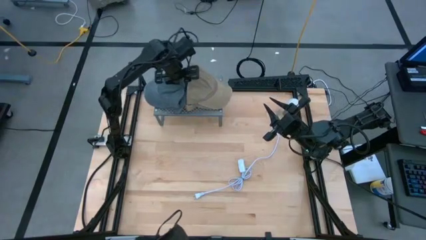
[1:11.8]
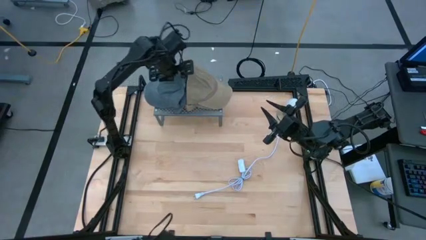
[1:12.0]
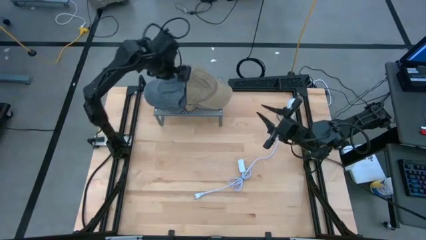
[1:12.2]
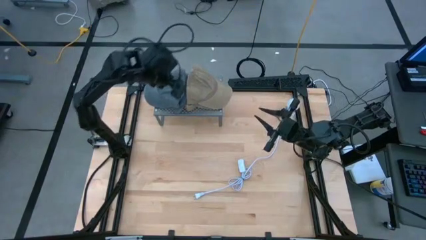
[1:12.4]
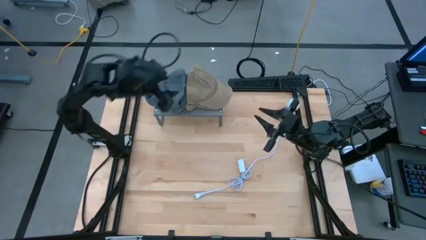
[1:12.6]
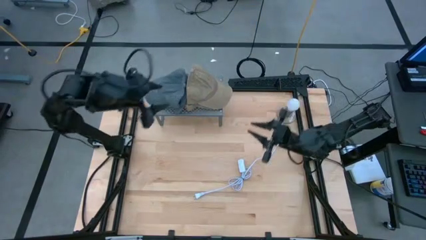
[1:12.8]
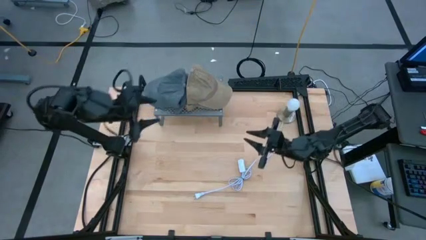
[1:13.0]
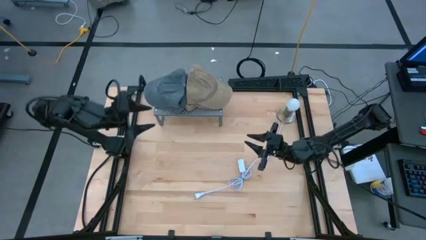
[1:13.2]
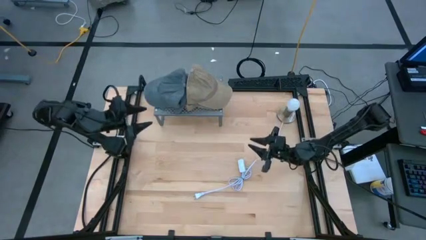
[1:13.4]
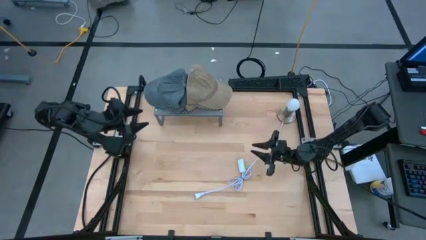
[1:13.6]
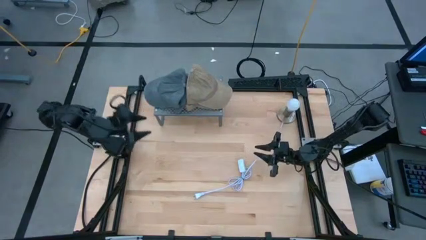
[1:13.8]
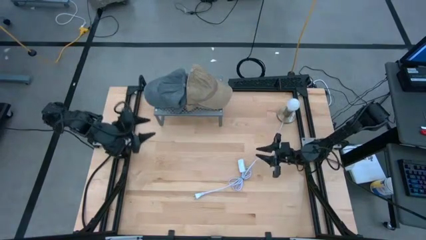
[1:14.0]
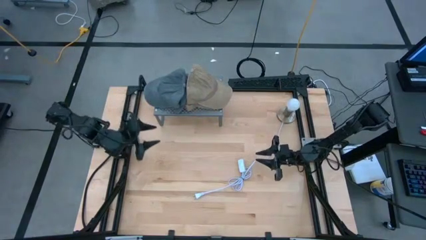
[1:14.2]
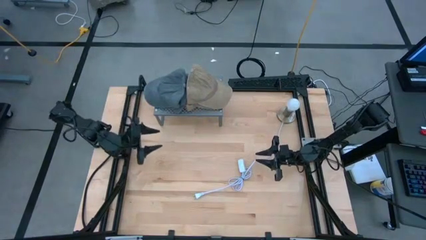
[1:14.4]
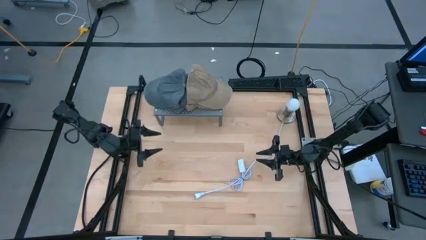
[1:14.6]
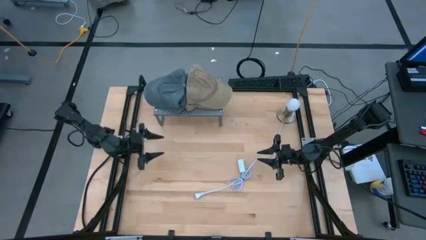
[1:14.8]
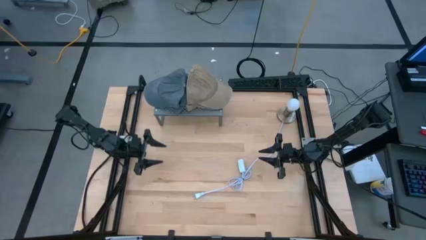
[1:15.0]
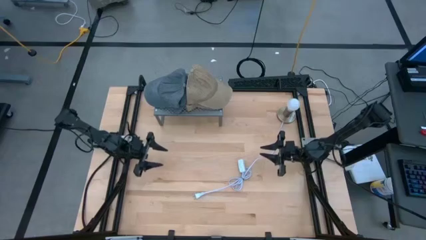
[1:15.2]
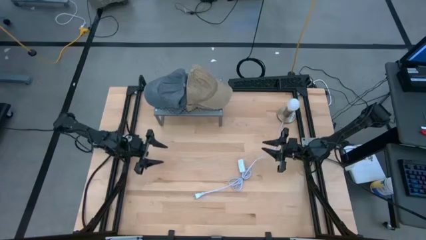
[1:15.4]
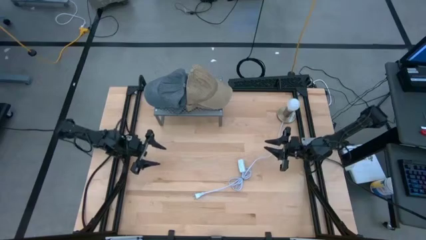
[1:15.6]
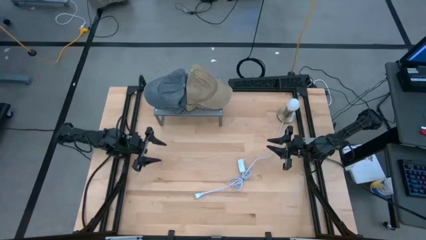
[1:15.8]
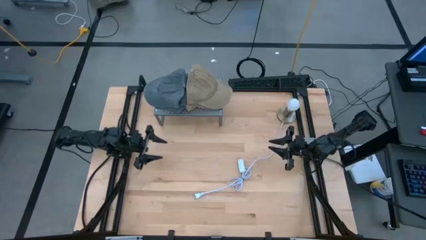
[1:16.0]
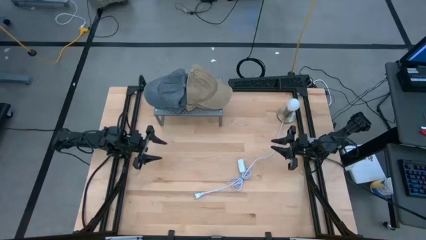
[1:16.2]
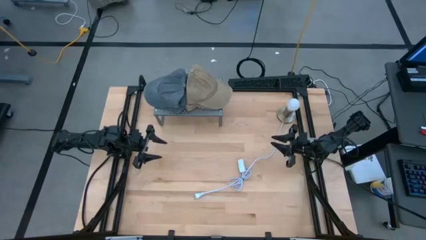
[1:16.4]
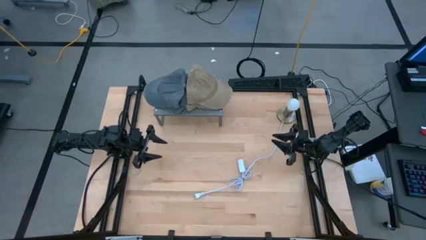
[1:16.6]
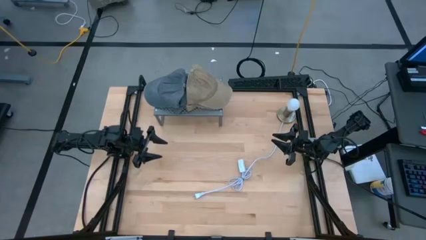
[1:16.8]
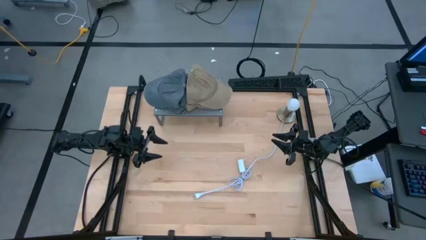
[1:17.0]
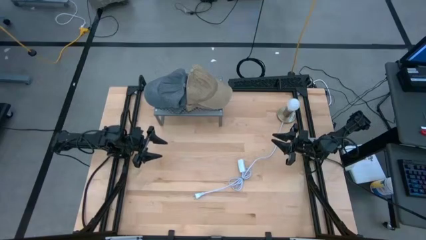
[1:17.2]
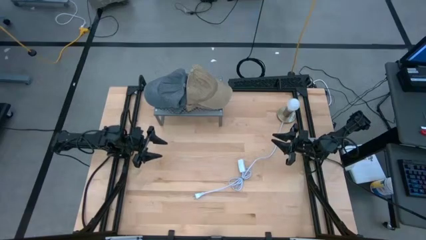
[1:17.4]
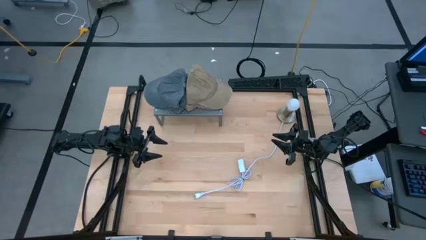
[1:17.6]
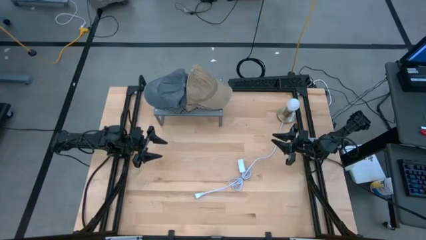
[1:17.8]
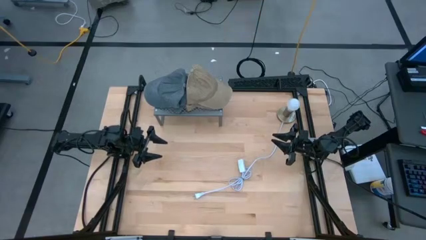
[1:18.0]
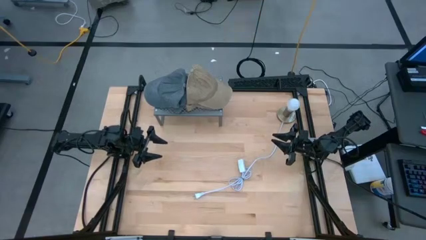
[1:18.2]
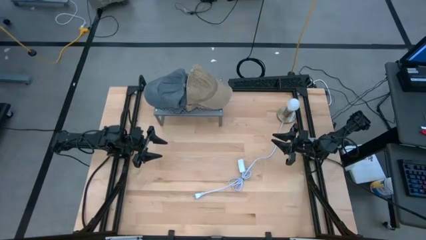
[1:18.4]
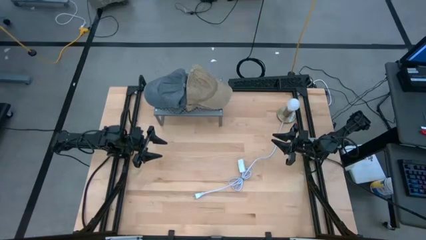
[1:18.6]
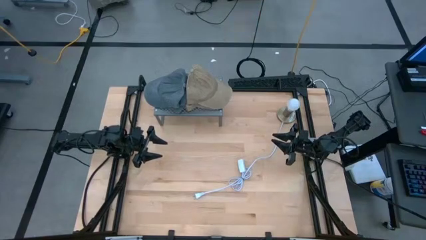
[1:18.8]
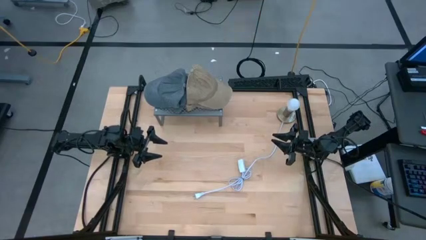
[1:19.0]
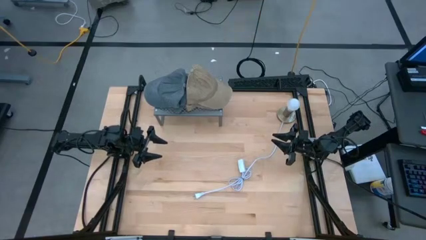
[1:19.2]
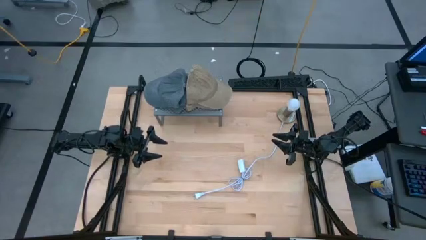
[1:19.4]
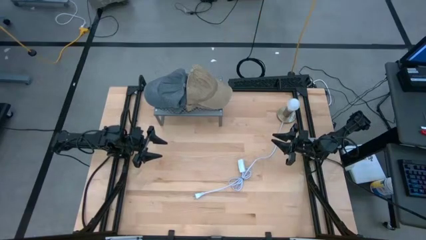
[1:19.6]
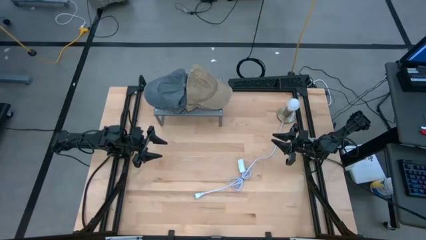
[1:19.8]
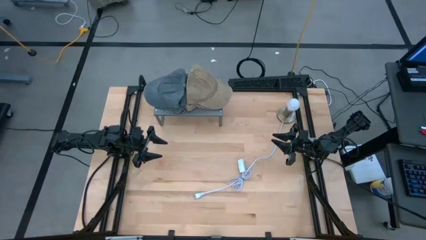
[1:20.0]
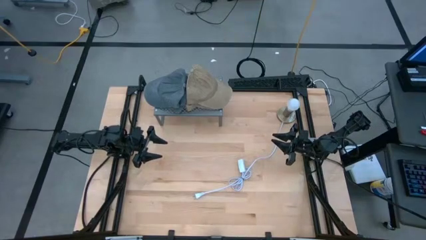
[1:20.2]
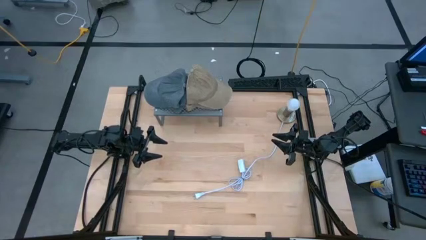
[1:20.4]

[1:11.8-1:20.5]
Task: Pick & Place hat
Return to Home Position

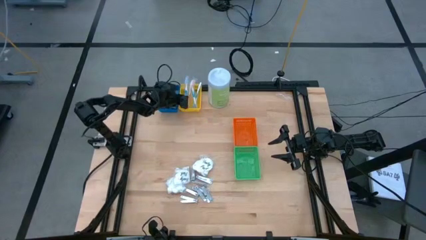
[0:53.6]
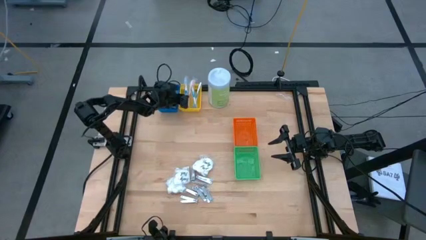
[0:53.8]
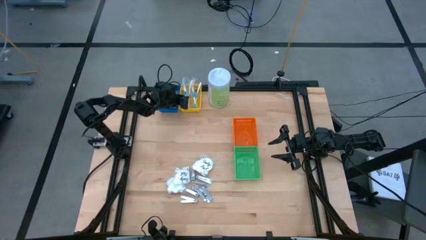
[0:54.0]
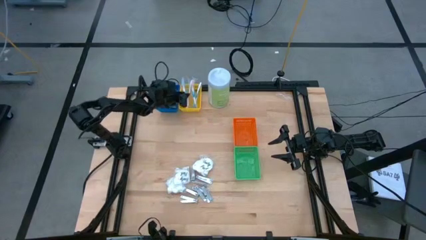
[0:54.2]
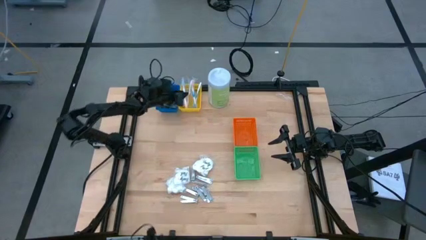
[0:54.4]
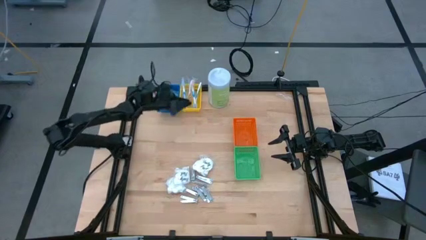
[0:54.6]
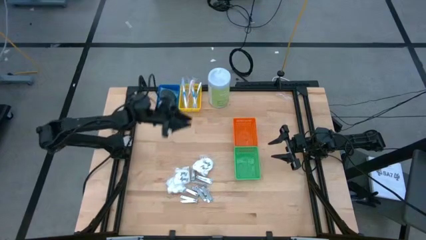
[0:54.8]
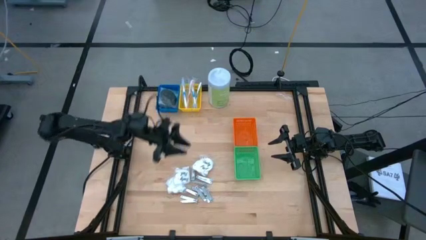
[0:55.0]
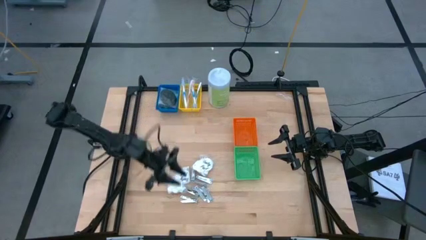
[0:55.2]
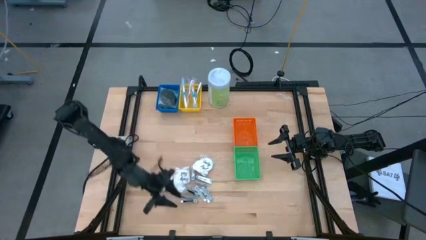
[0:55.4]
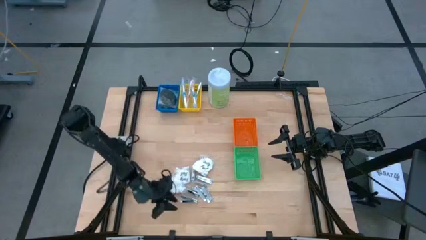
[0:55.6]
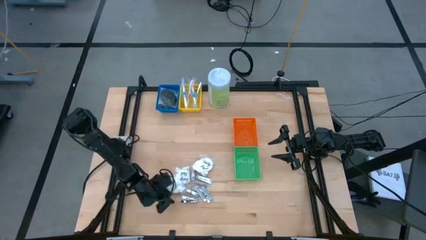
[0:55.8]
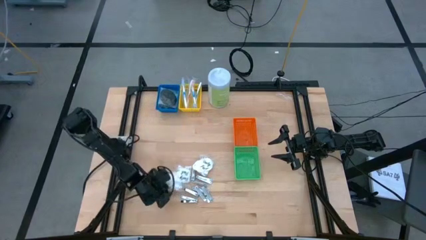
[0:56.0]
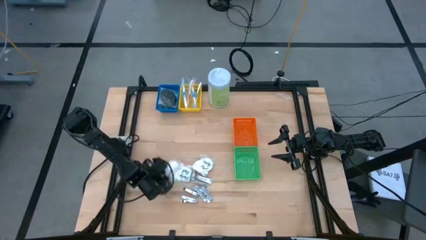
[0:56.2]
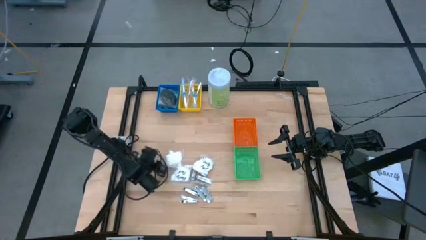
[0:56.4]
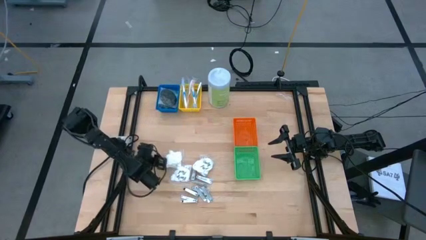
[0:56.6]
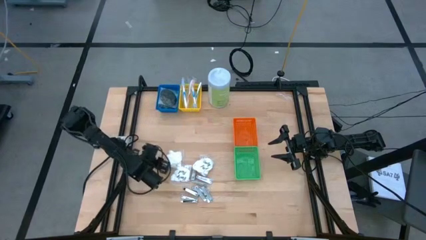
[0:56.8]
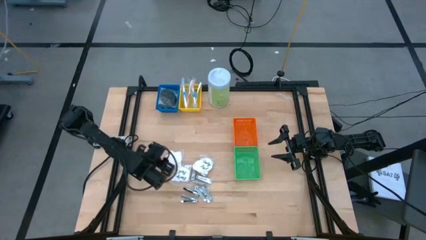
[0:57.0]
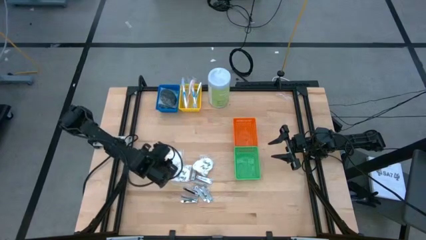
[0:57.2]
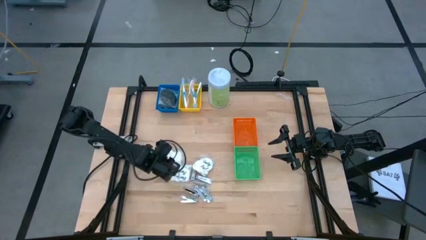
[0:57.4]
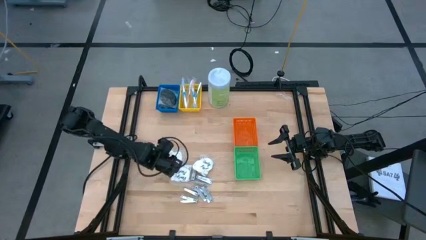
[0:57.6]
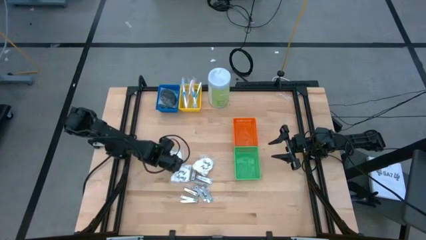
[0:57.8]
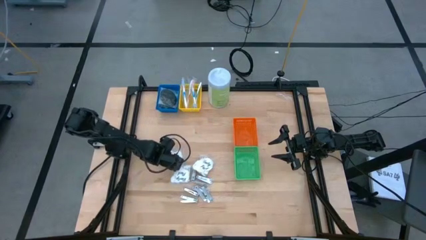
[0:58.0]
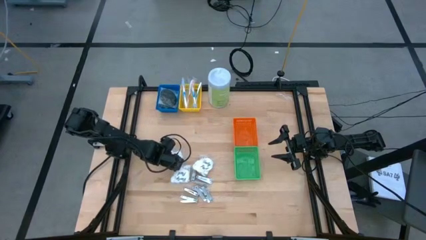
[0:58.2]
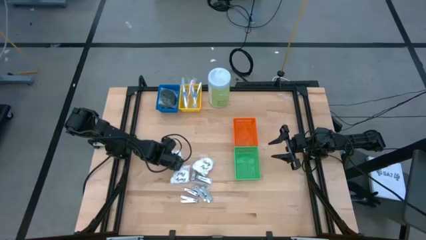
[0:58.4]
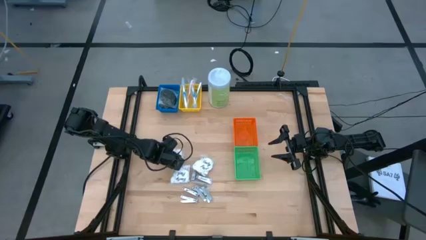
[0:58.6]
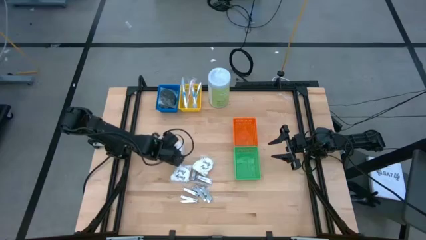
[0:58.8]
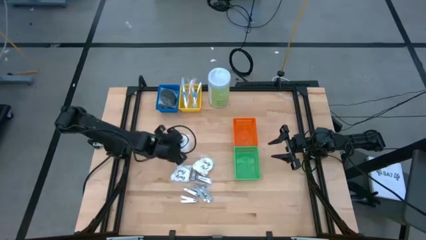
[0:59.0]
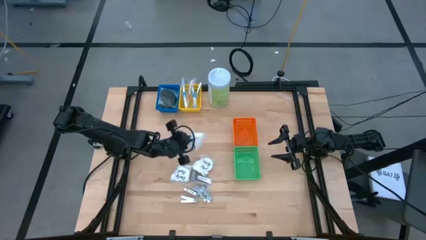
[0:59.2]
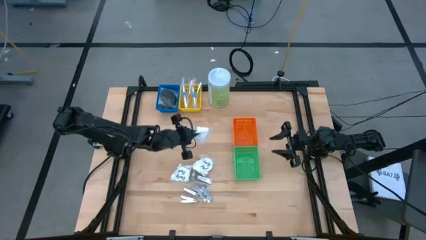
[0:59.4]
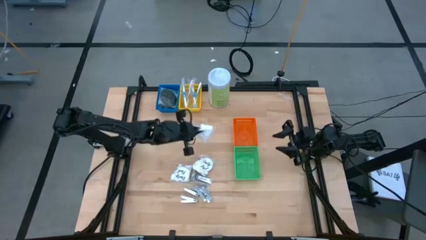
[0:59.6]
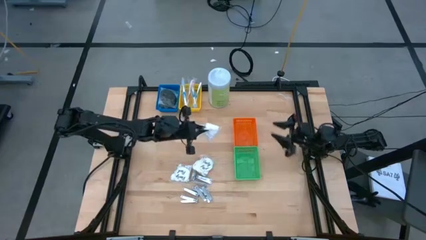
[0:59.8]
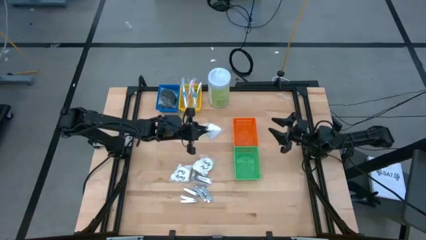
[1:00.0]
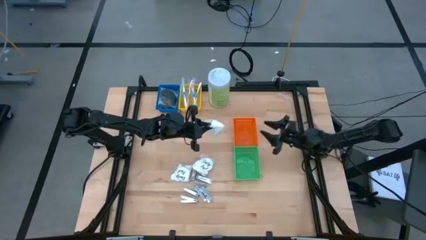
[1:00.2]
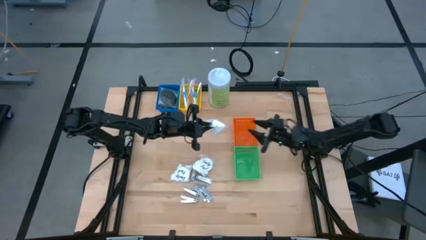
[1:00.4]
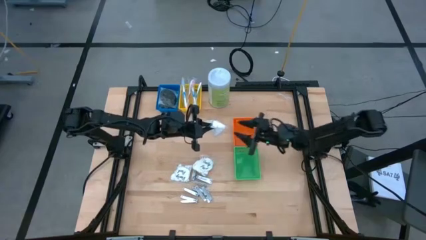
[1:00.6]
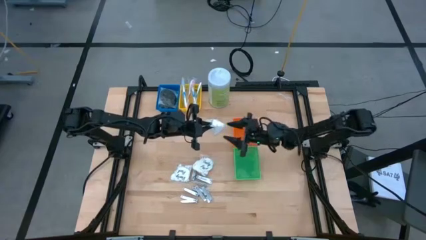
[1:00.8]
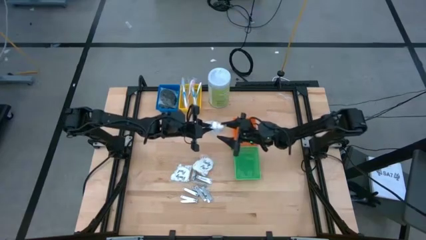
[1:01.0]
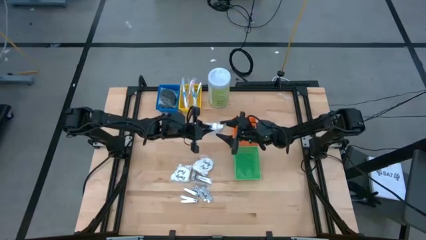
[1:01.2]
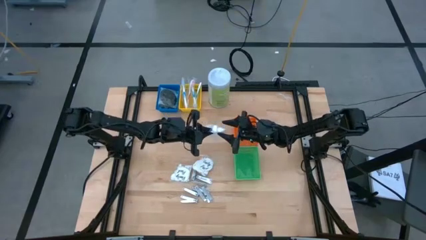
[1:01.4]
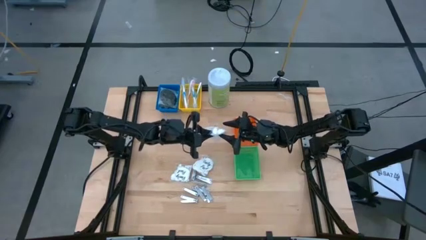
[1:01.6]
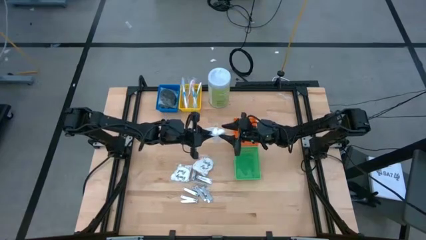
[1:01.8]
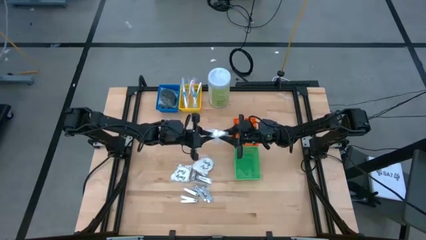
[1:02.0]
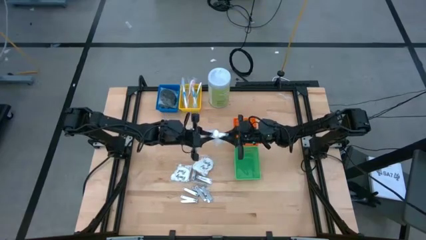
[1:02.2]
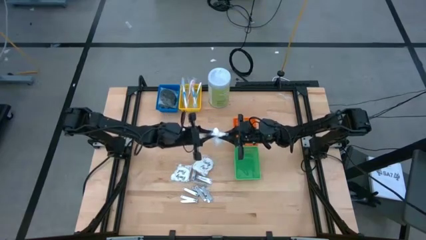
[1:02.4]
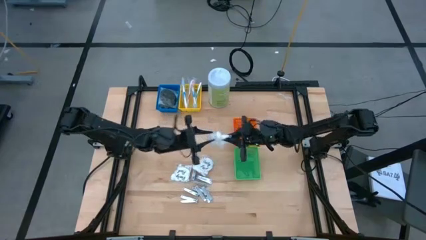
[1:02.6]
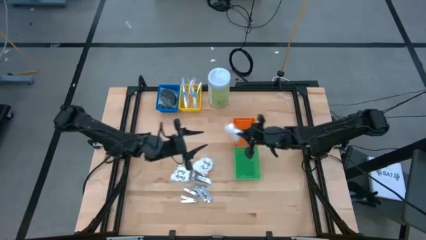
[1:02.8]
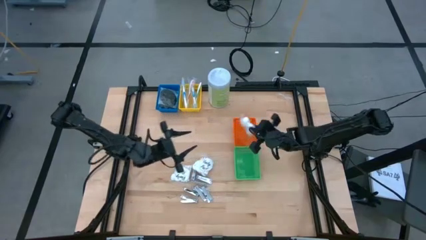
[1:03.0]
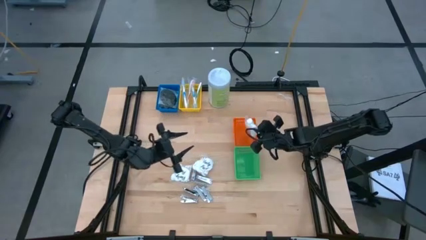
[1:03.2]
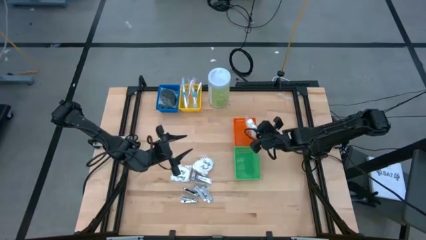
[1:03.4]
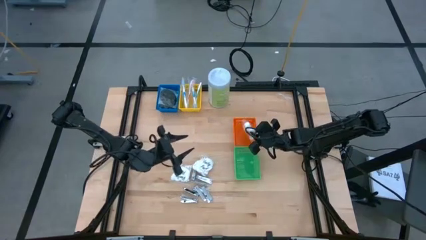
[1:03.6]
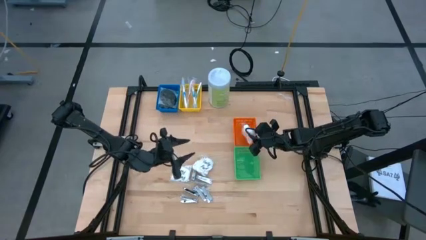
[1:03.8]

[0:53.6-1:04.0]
Task: Pick & Place Travel size toiletries
Put the cotton pack into the orange bin
